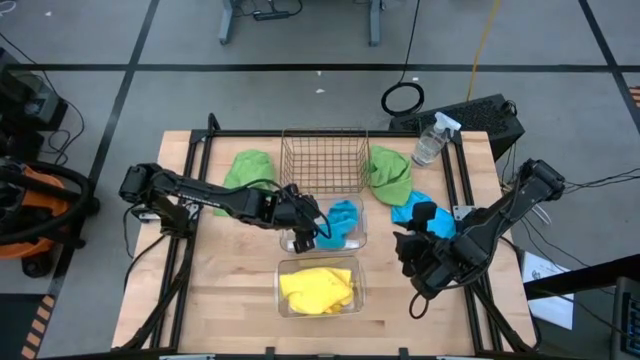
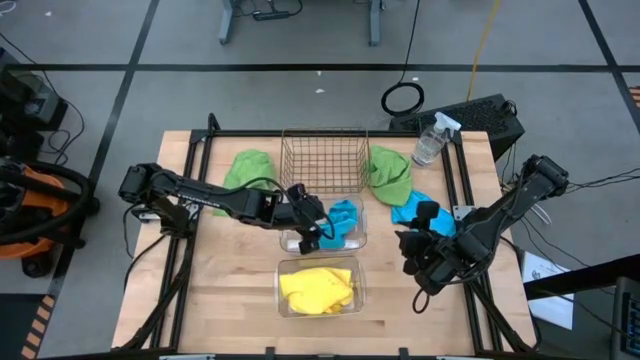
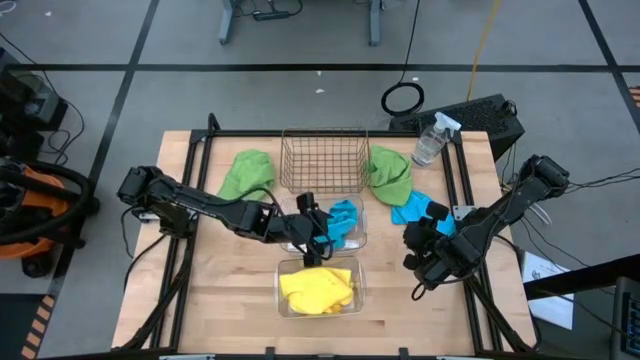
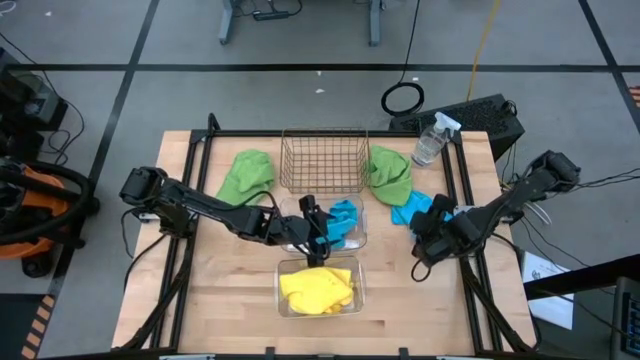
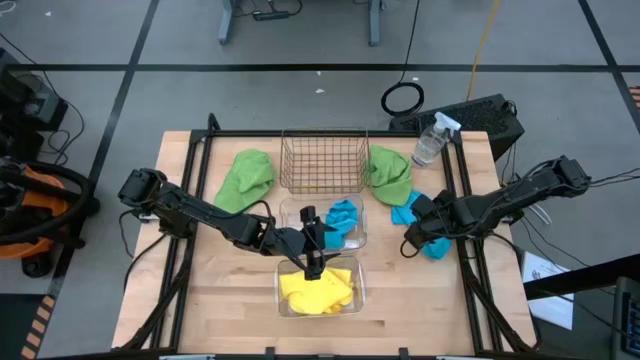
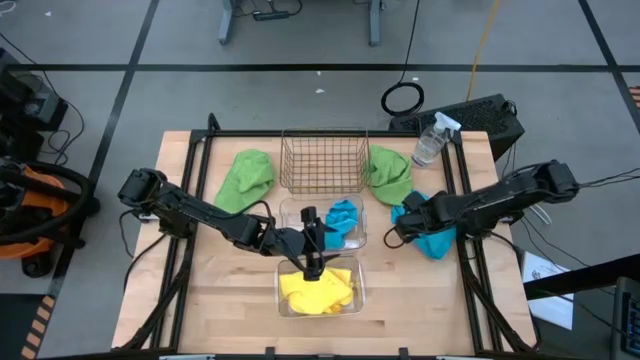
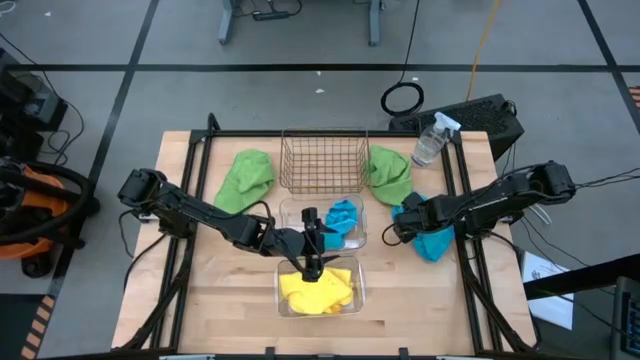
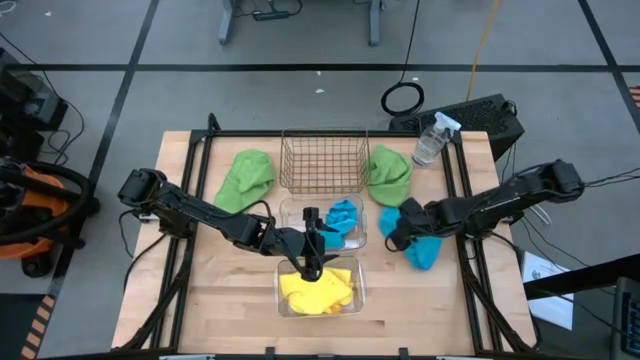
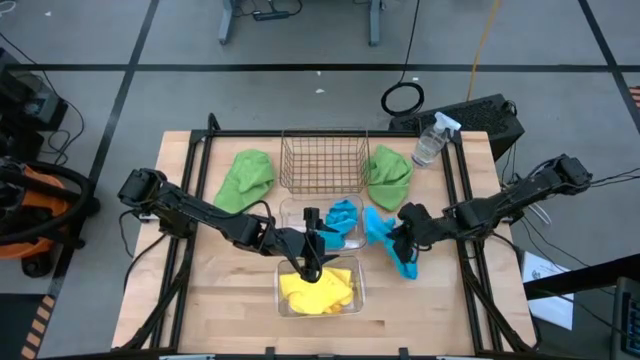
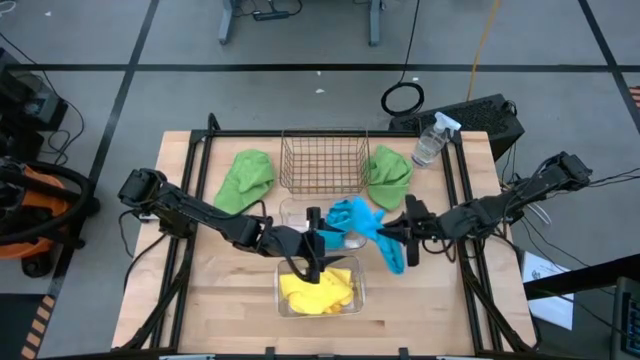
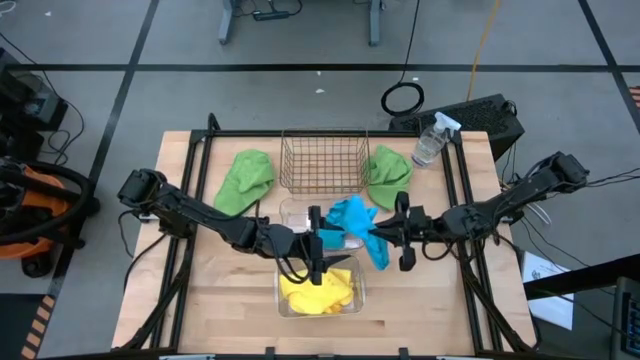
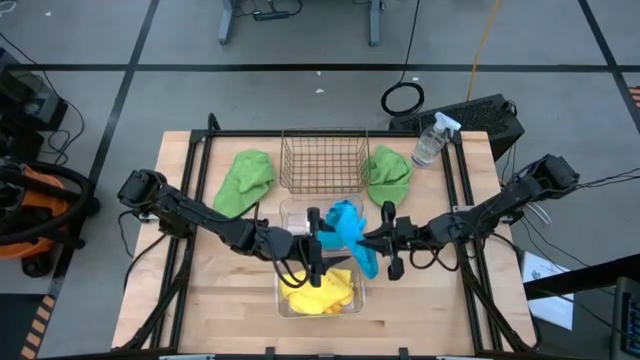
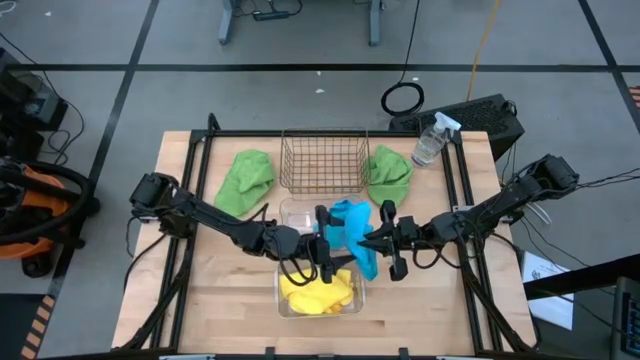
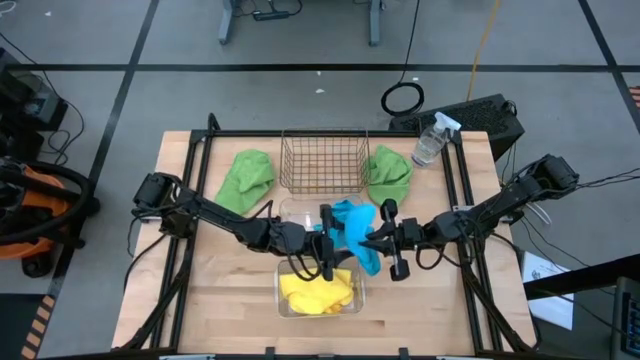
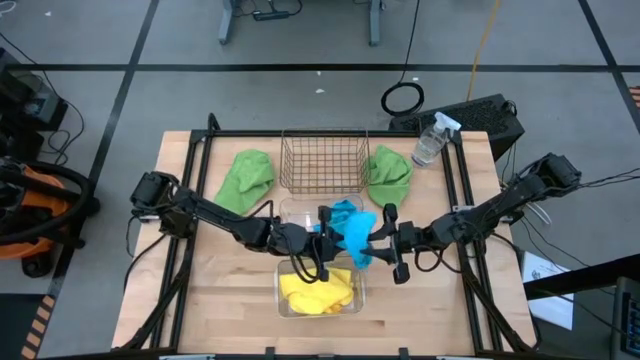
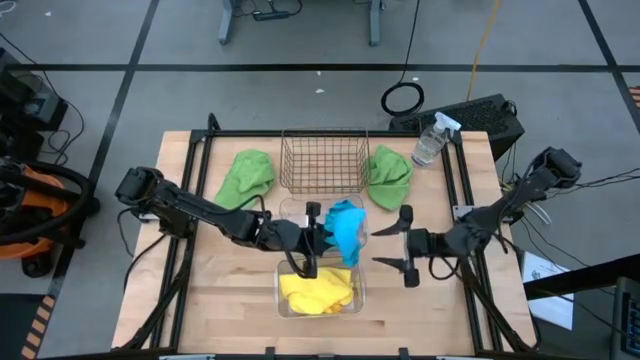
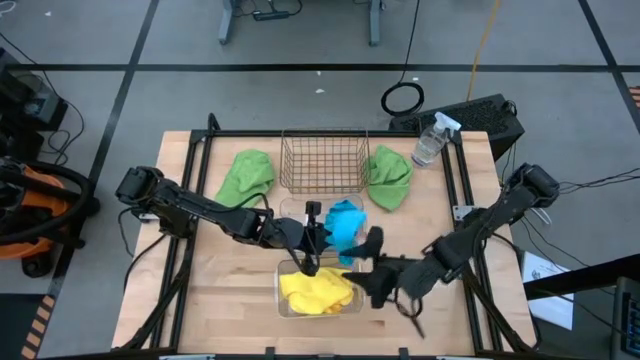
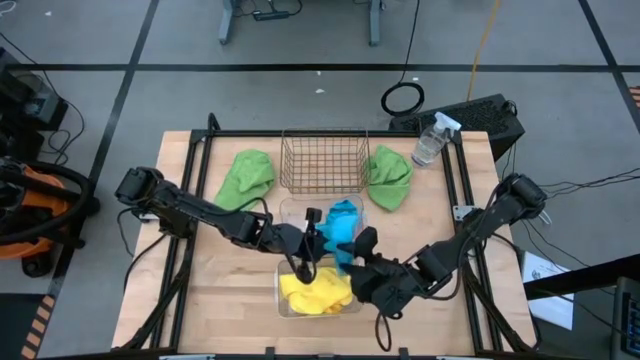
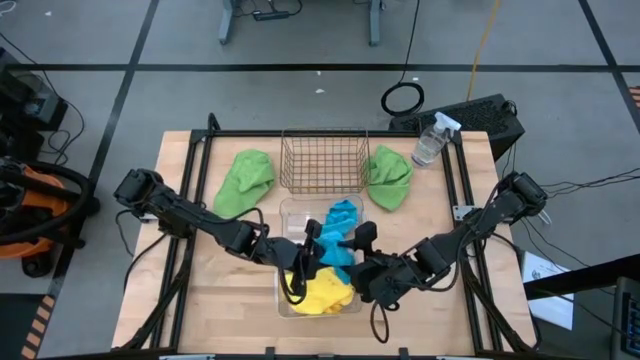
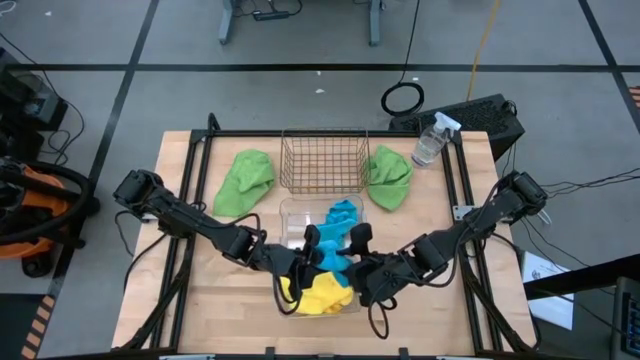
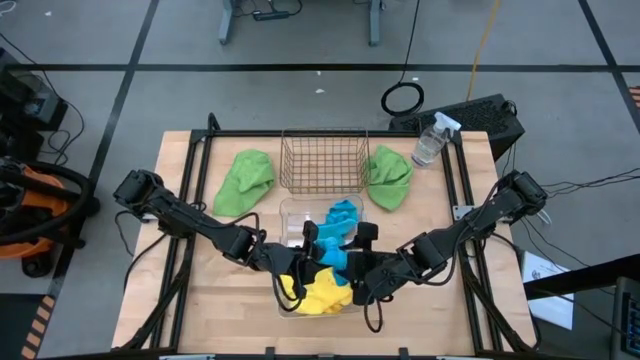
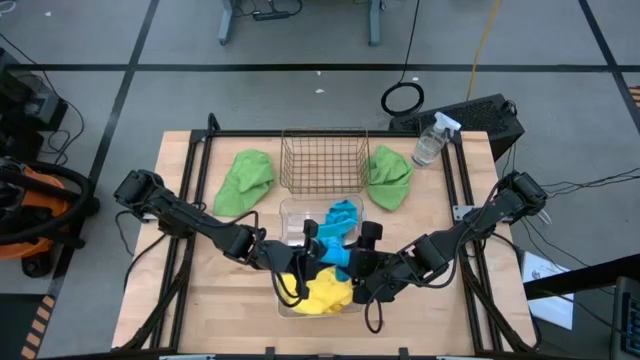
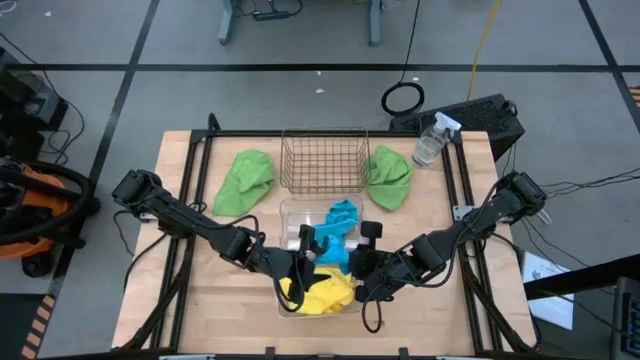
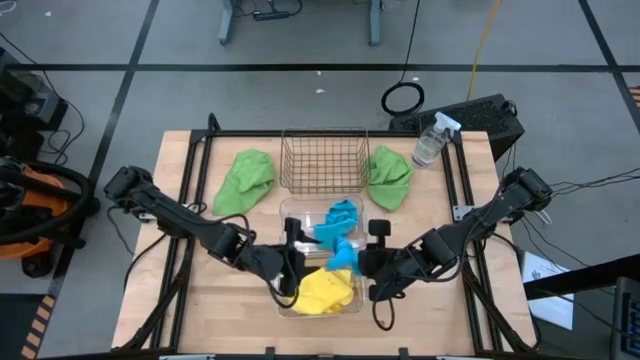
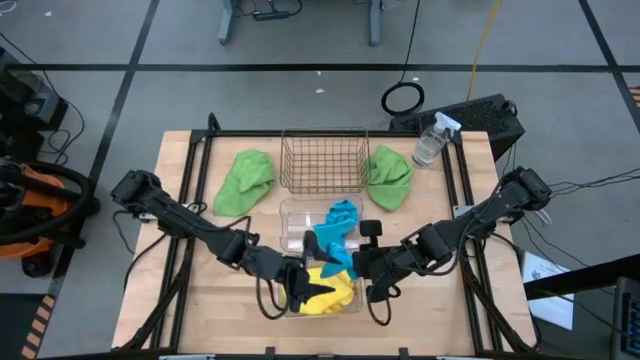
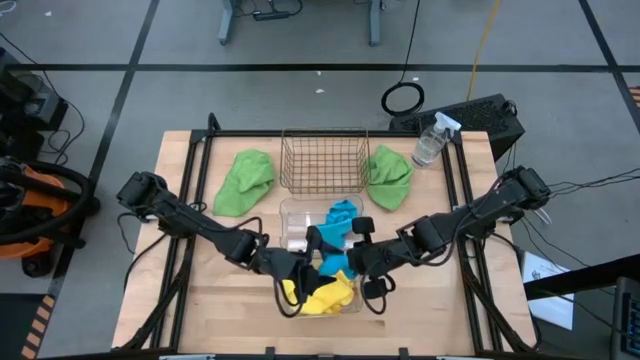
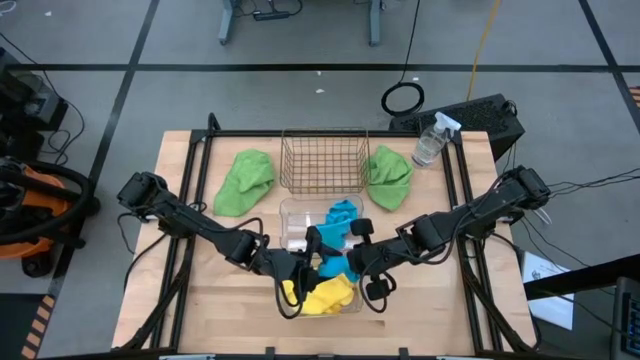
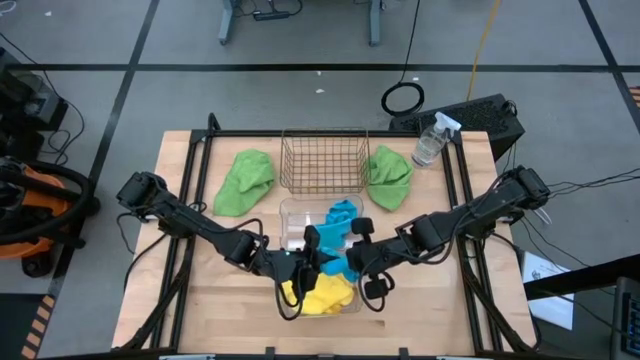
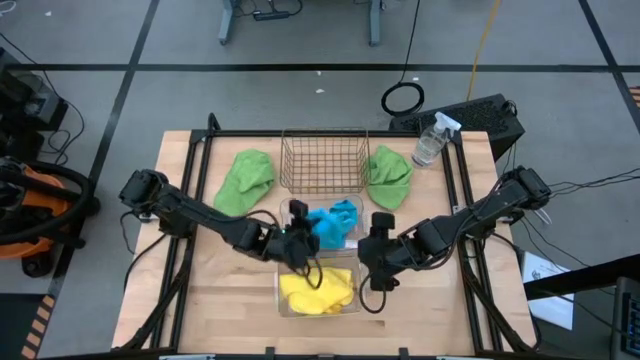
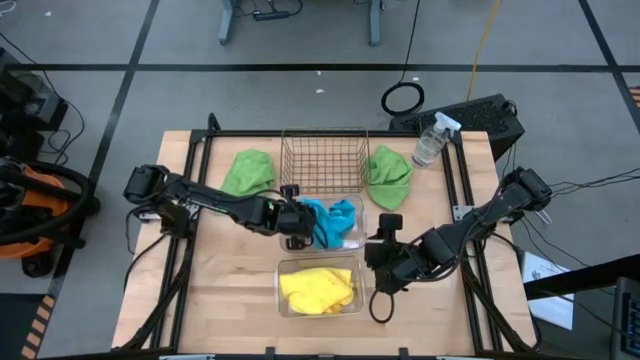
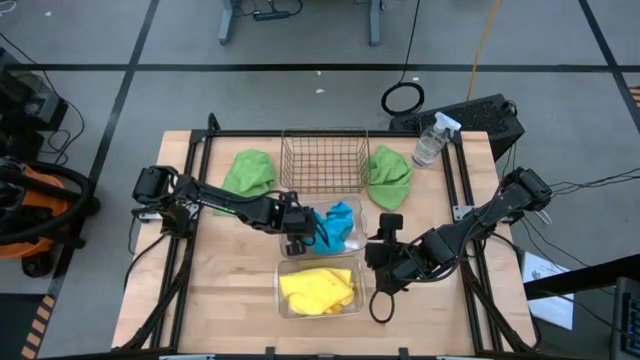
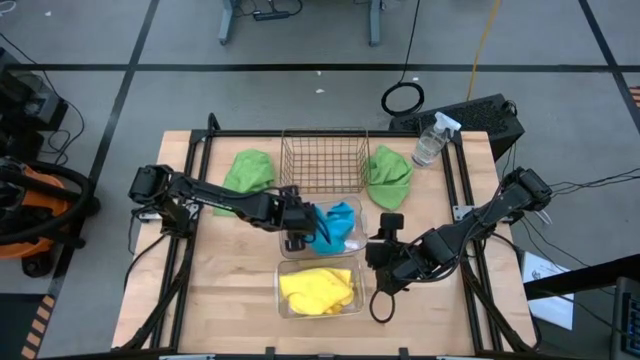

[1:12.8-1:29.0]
Task: Sort microfiber towel by color & place in baskets
Put the blue towel into the top transparent bin

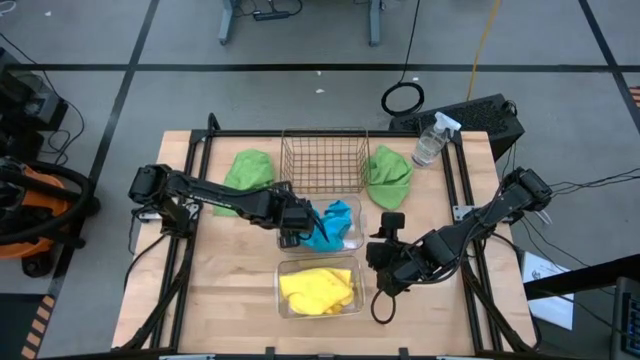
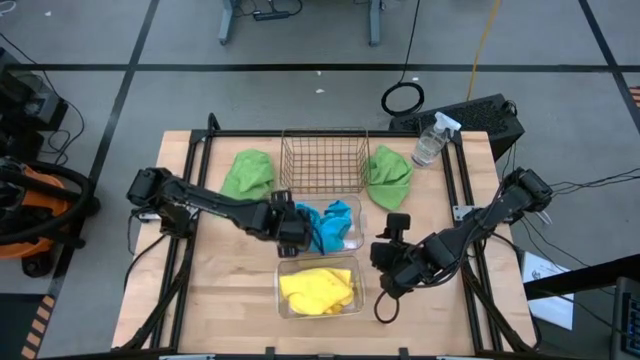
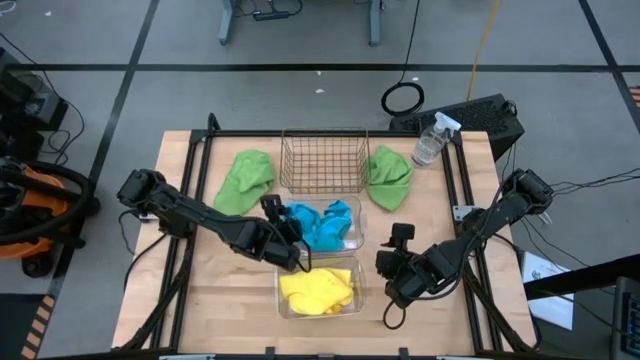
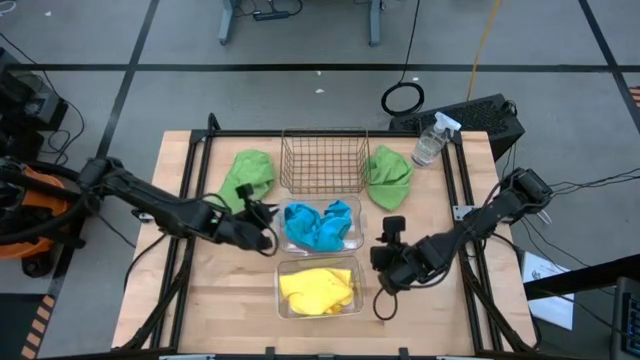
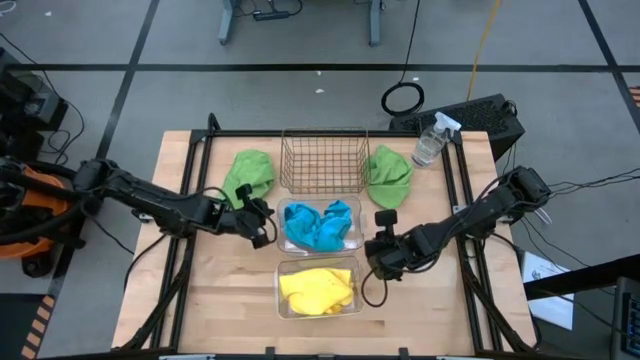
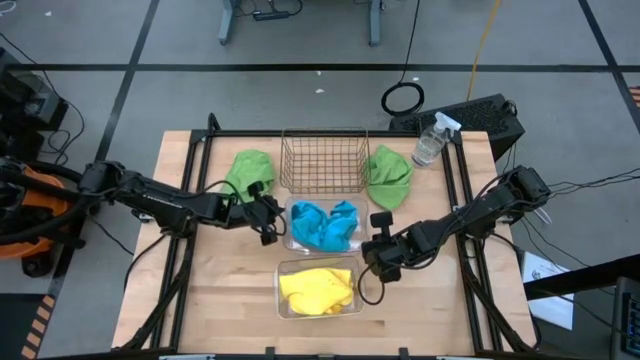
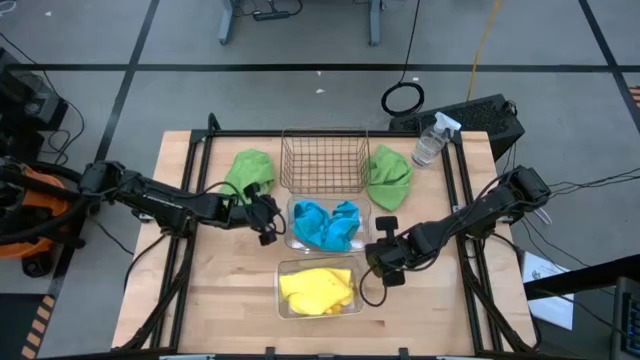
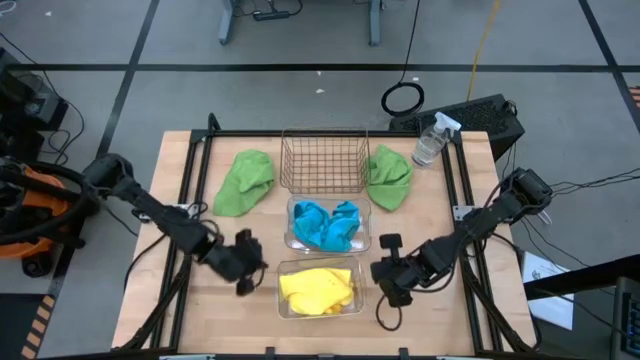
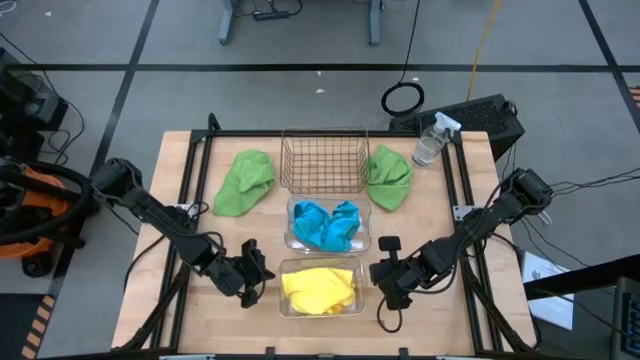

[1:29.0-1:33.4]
Adjust the transparent bins
